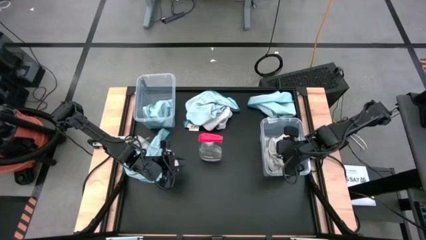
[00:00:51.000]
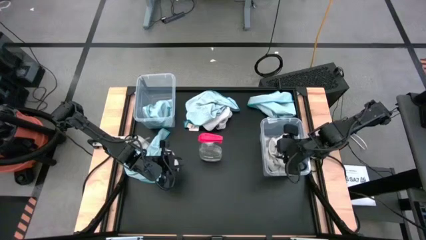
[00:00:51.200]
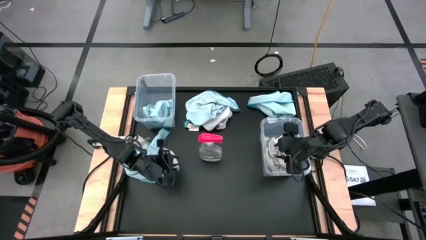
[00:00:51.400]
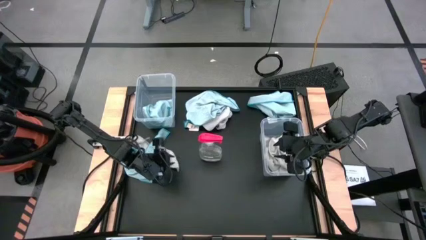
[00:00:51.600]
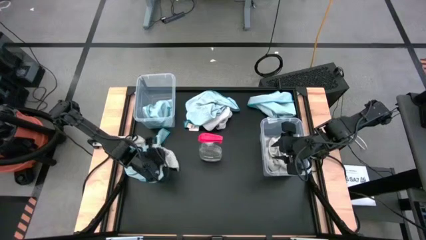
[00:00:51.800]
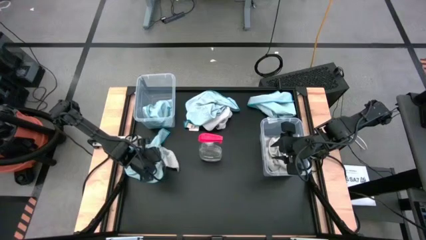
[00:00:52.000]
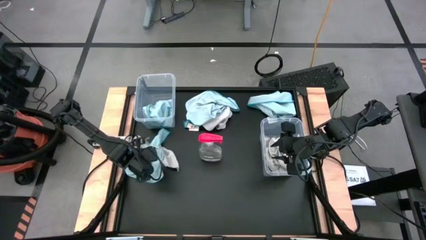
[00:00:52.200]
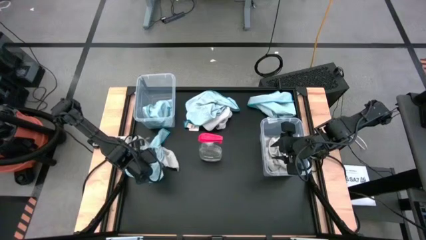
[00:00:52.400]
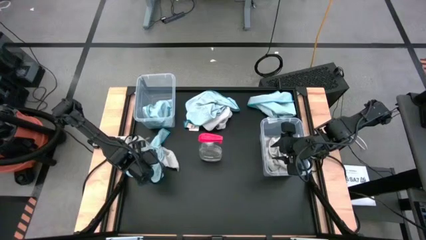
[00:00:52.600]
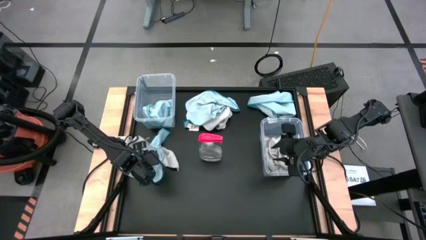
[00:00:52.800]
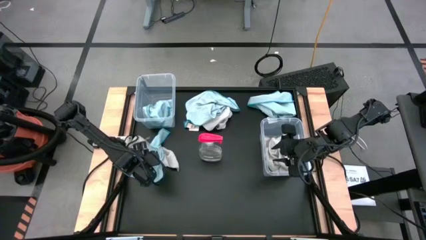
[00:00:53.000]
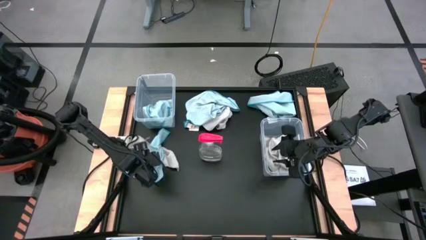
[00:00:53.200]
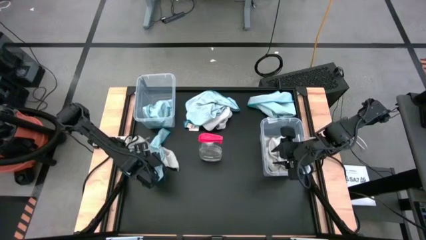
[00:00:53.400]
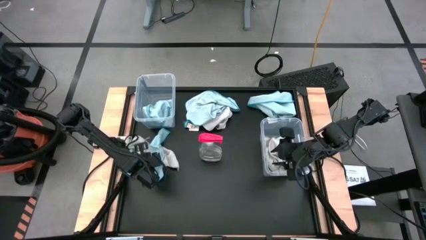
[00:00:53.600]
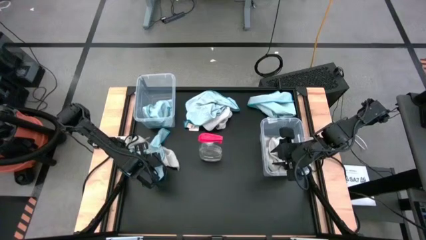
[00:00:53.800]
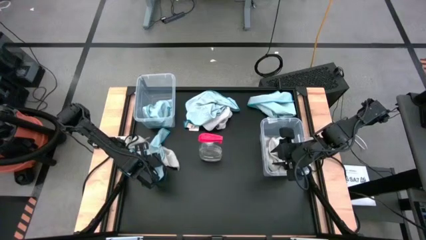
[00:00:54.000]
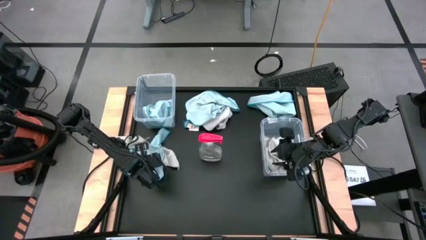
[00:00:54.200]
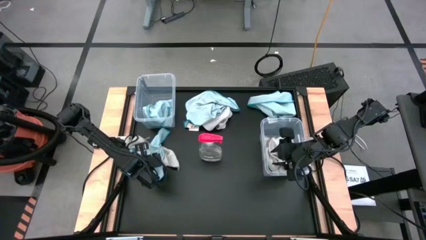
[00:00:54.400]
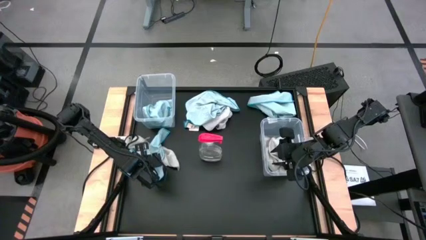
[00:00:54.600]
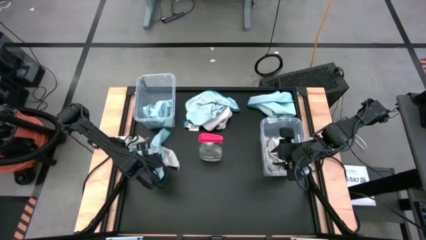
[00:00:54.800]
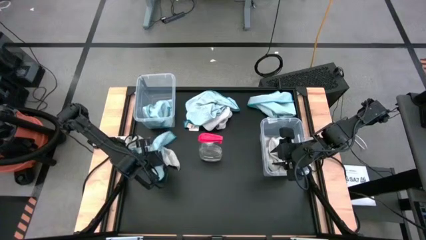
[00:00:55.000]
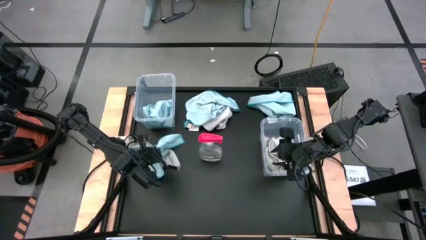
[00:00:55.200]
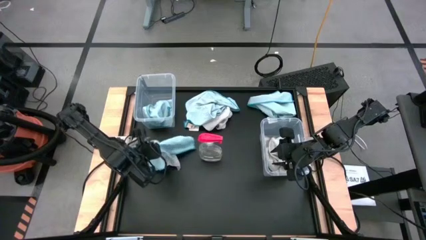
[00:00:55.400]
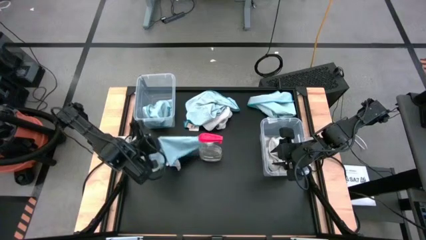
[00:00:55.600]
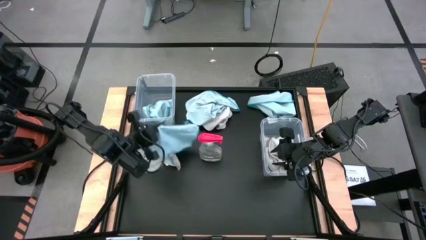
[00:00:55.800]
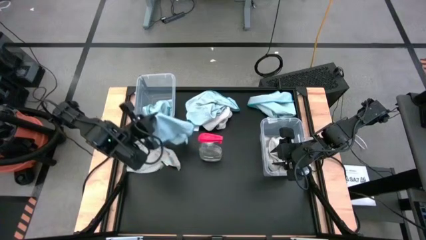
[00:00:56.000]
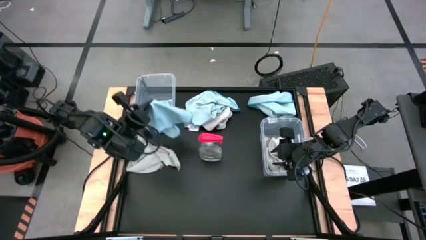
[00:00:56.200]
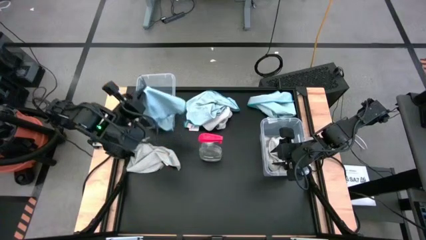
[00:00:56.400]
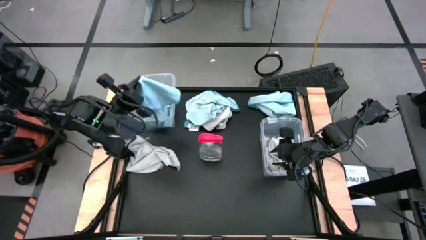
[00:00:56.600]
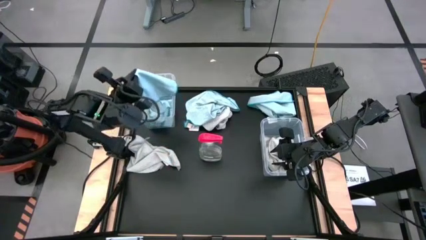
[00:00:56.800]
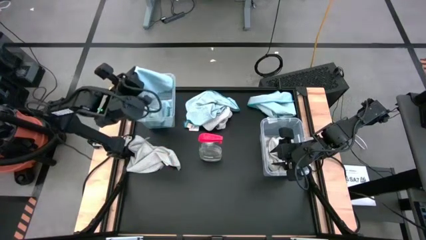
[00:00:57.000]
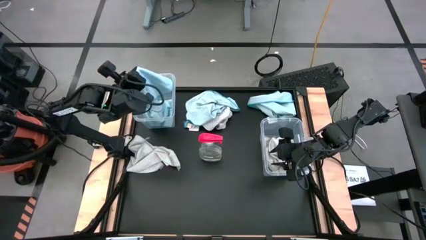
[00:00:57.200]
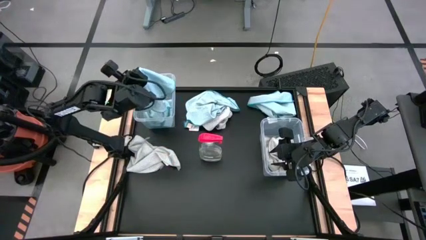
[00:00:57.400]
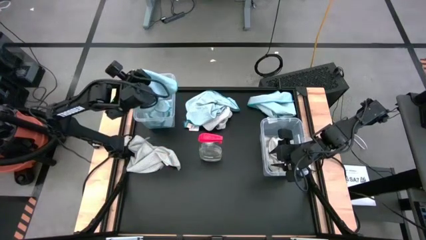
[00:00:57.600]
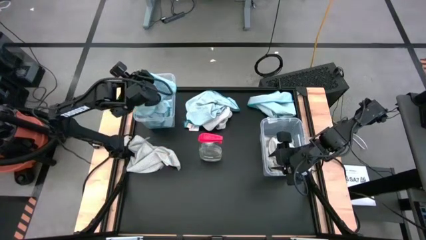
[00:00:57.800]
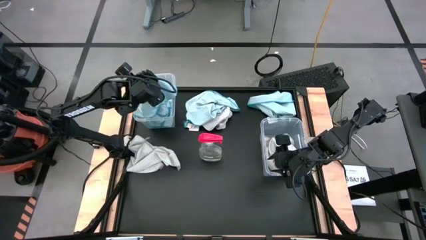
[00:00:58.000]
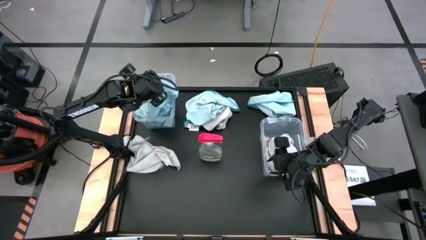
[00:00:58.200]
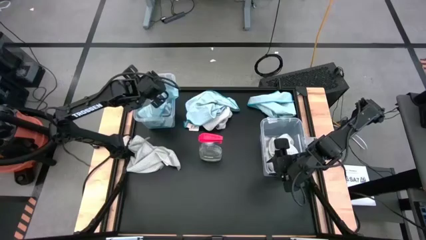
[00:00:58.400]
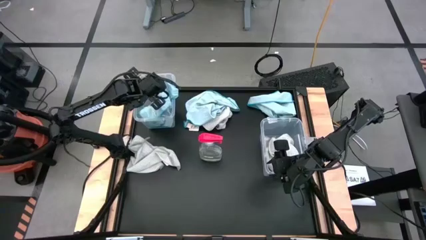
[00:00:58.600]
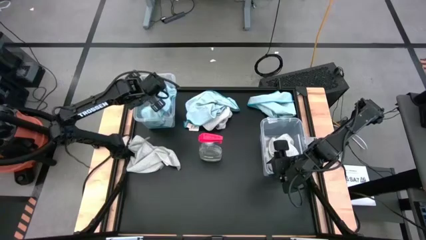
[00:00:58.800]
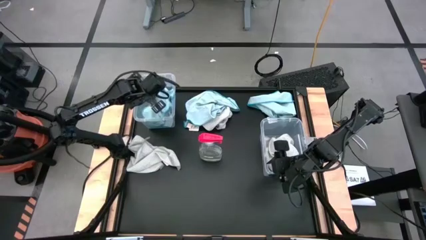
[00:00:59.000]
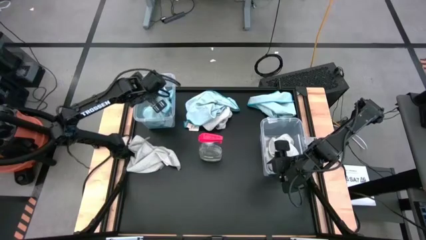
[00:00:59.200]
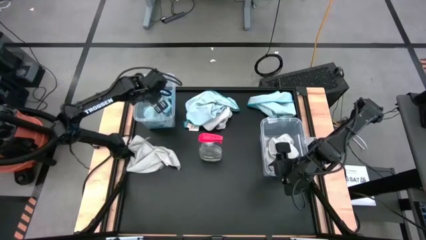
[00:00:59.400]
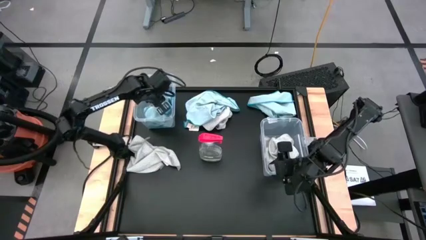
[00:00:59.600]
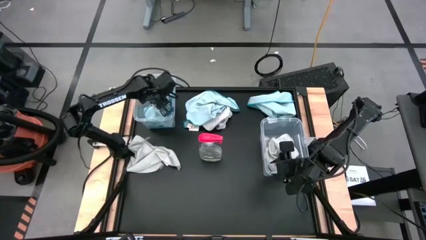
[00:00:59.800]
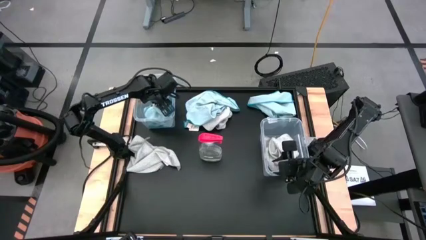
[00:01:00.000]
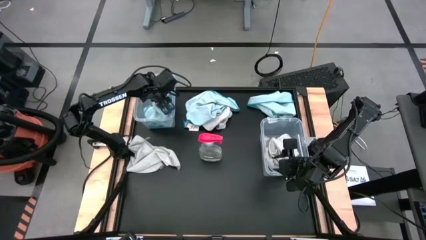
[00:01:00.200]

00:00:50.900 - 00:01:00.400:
Task: Sort microfiber towel by color & place in baskets
Put the bottom blue towel into the left transparent bin
